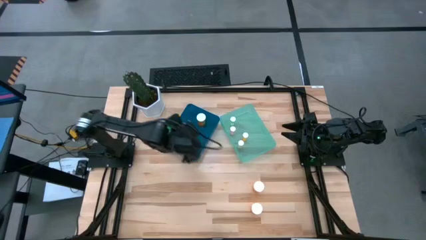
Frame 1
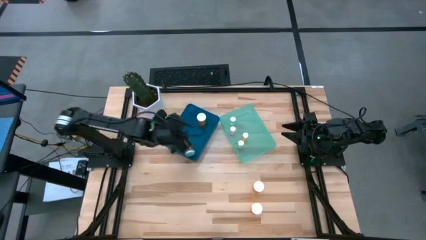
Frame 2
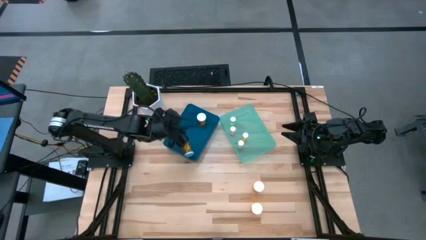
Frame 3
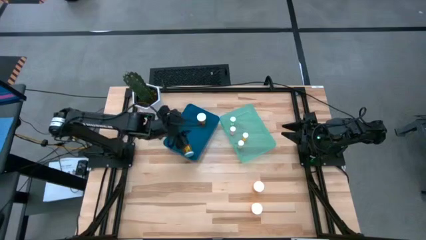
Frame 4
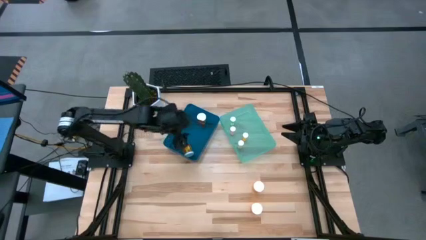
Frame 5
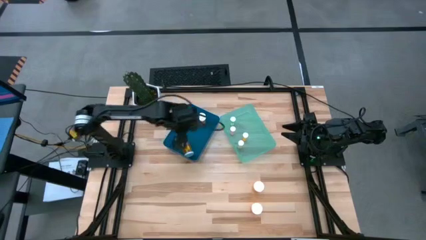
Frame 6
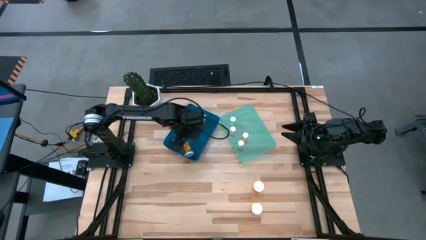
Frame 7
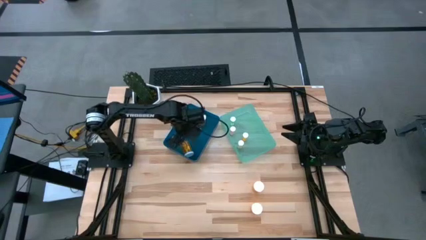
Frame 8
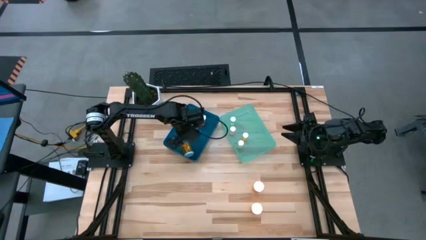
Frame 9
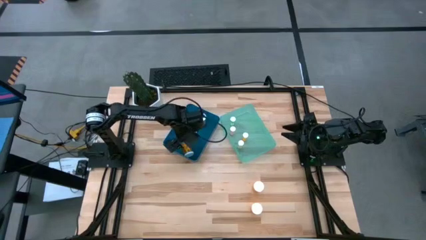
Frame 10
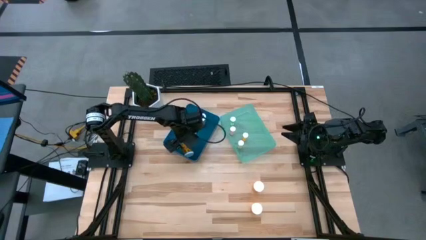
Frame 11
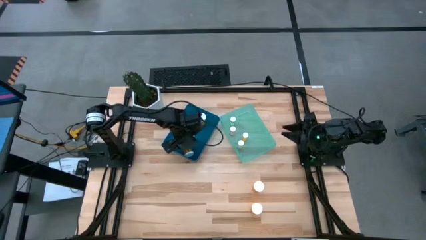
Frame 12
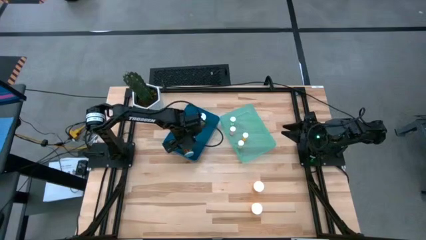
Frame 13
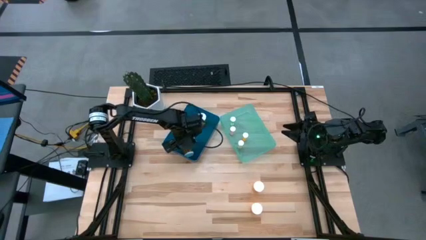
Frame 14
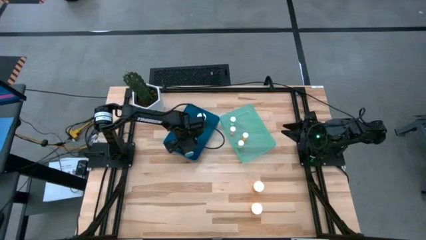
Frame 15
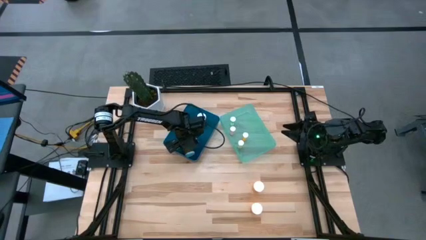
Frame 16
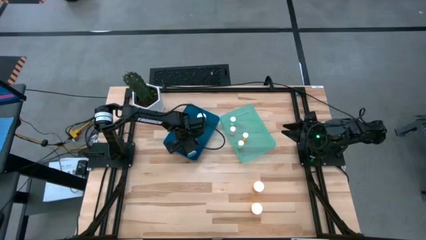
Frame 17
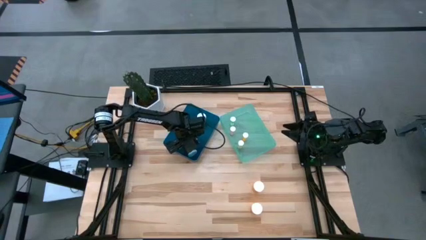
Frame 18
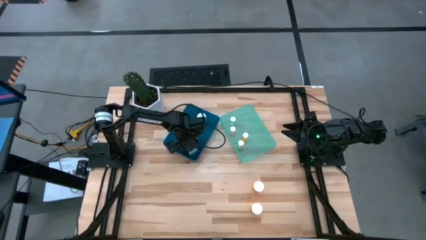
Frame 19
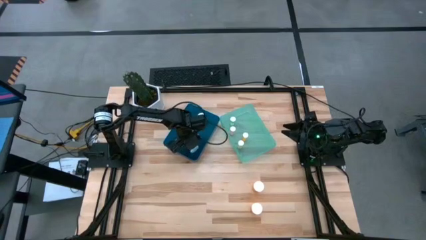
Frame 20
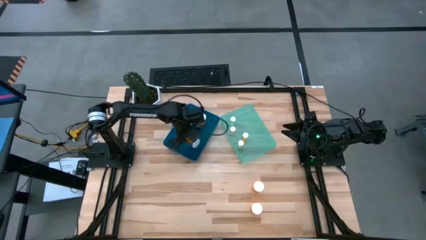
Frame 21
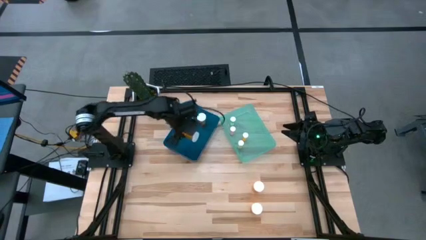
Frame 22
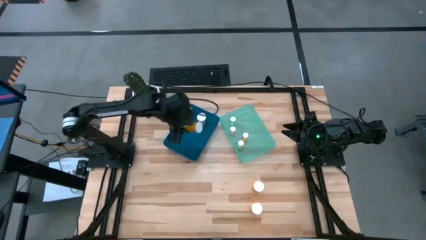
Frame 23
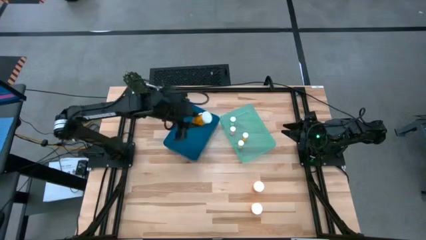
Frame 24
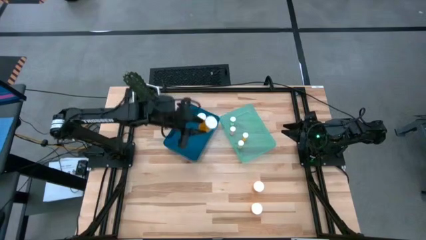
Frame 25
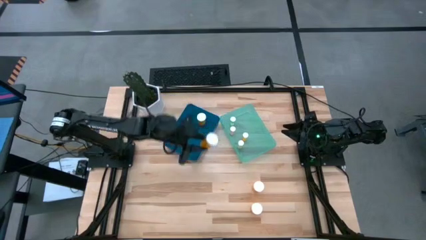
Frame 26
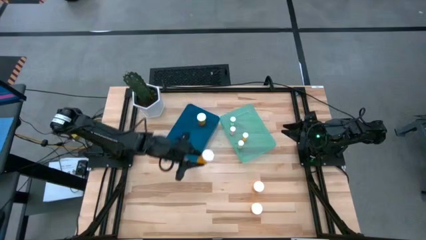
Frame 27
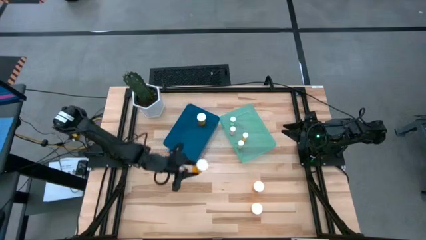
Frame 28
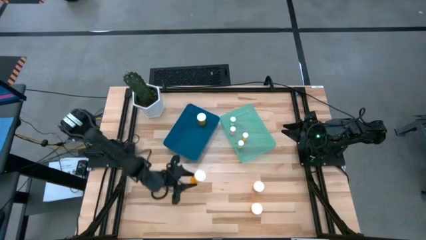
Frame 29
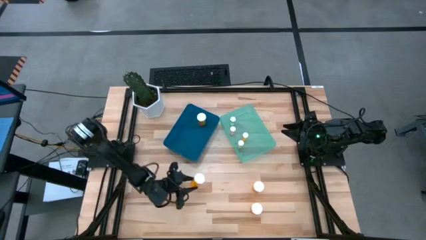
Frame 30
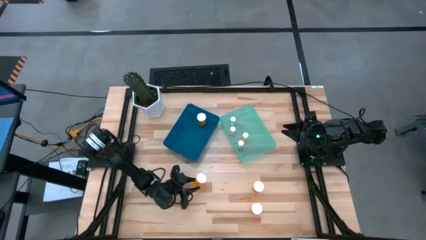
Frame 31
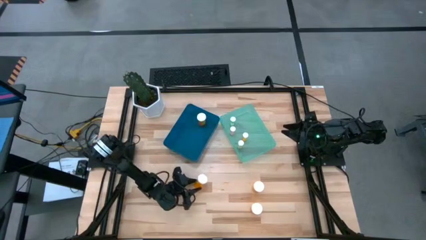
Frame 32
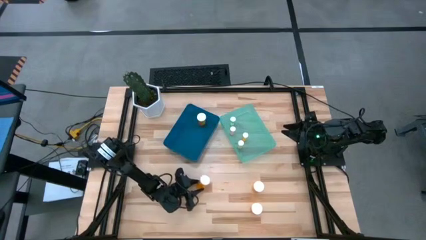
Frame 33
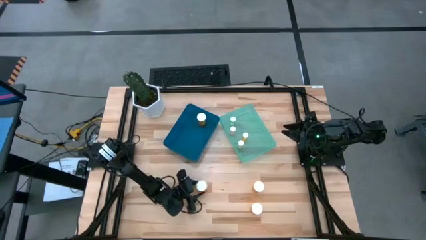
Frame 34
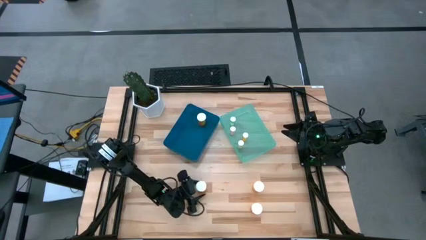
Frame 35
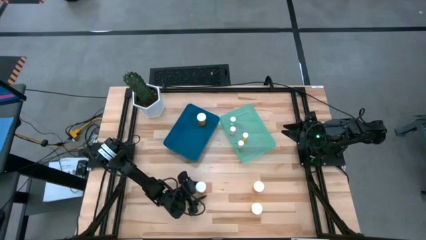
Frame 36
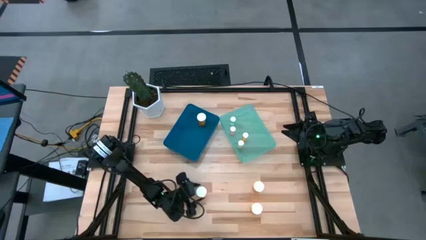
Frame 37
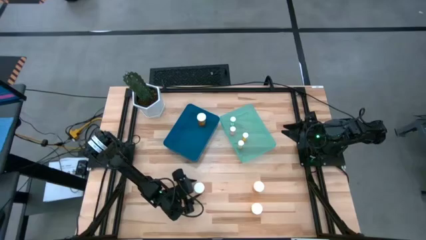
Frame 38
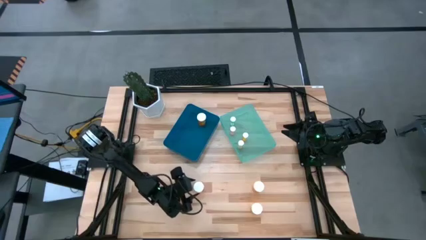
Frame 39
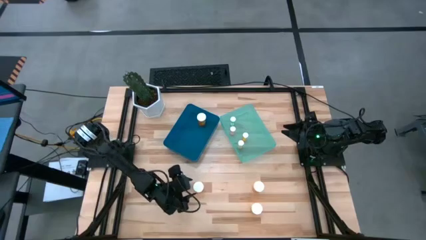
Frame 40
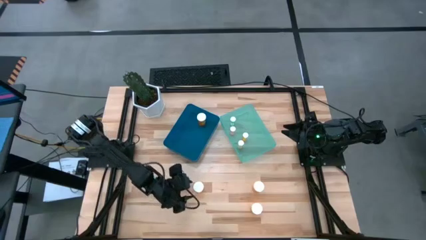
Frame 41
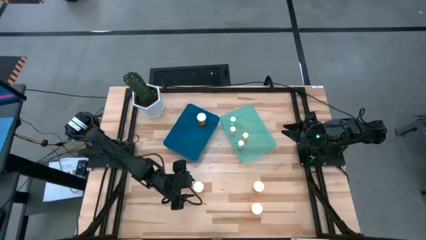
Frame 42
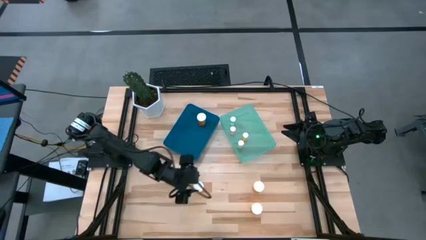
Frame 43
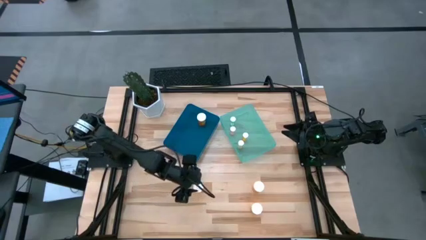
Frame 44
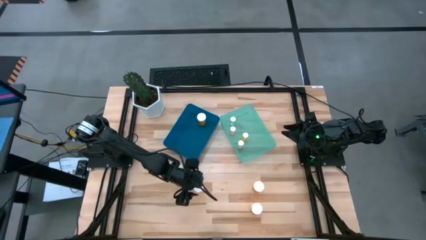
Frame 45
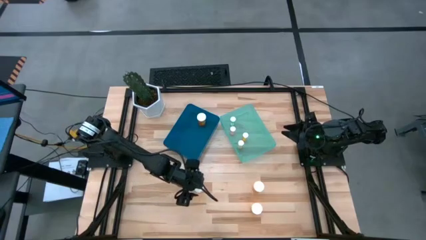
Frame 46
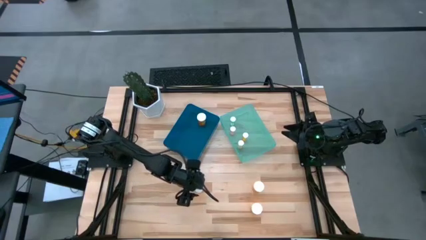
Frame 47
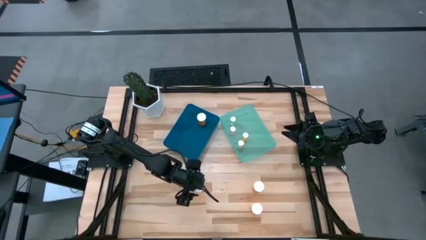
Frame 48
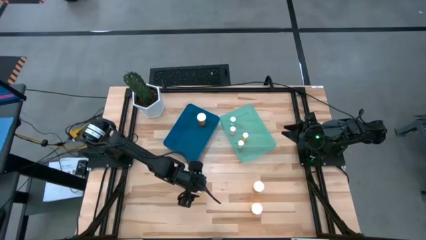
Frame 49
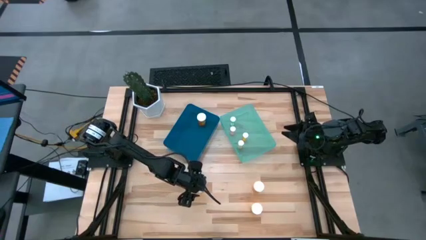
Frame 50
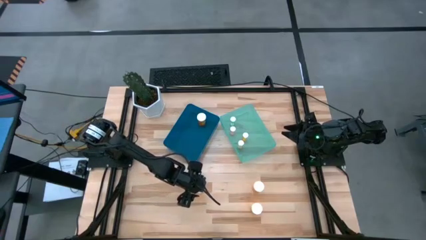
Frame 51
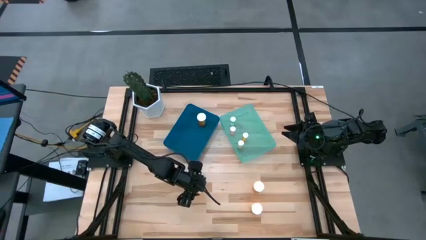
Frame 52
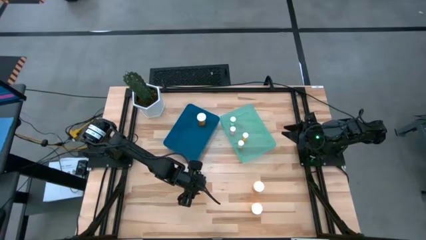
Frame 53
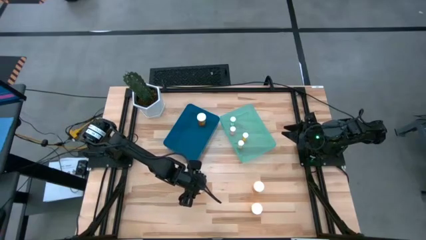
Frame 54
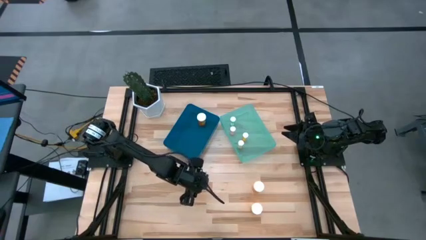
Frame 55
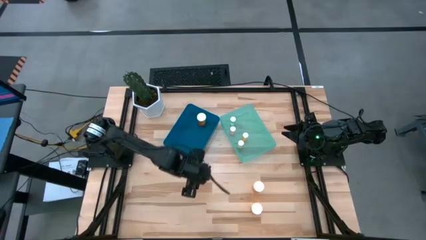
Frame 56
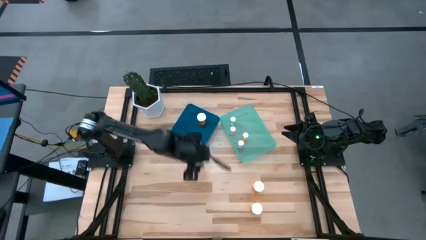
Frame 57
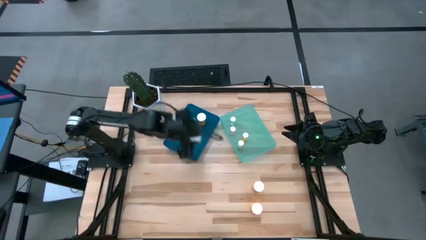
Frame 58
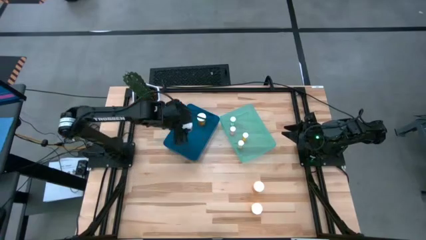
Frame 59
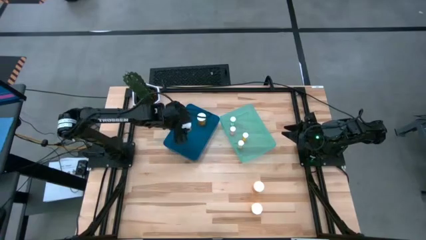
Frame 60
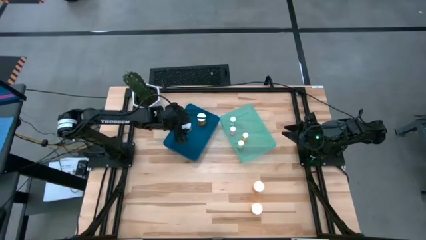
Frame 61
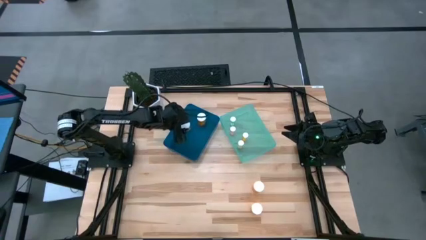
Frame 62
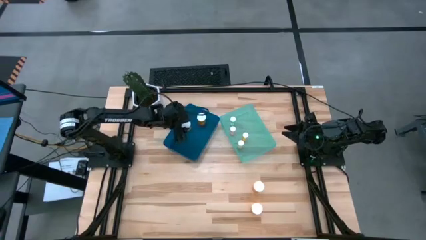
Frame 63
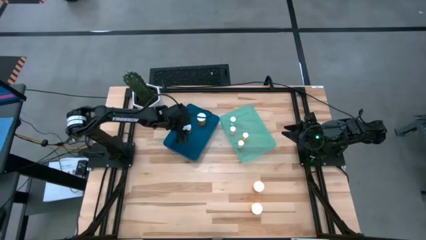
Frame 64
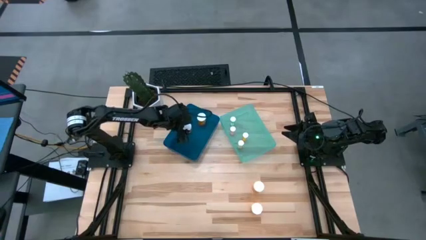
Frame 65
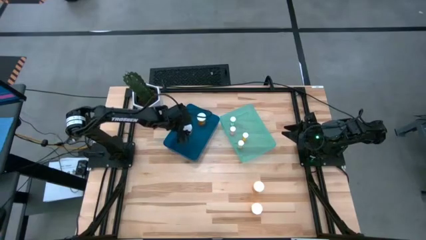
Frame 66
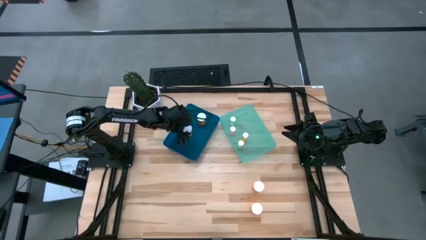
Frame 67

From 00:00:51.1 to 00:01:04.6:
Task: Pick and place medicine bottles into bin by pill shape (circle, oval)
Put the yellow pill bottle into the blue bin
